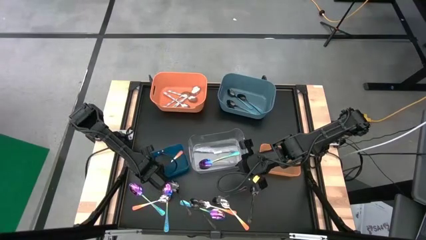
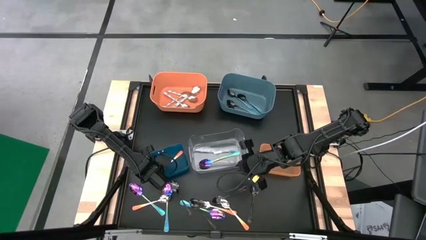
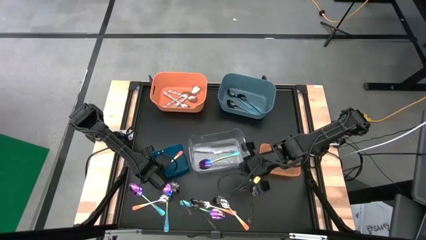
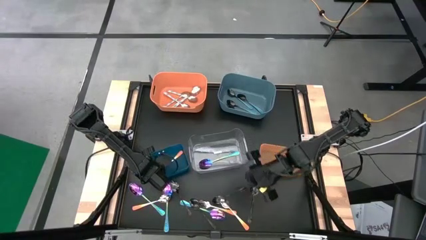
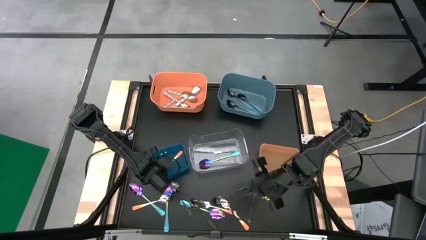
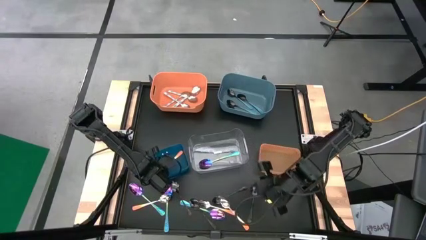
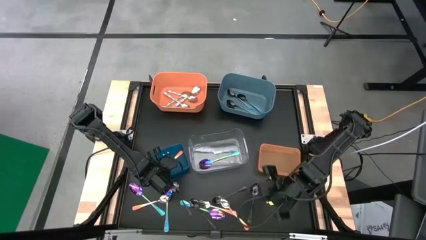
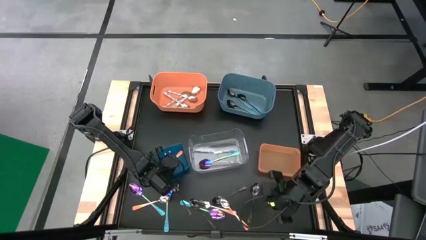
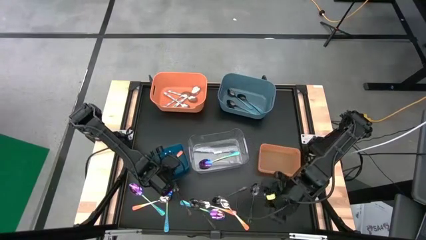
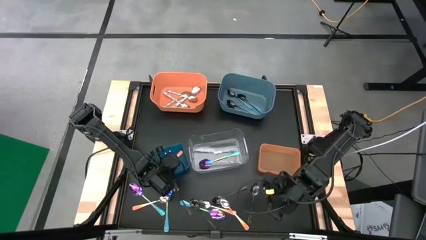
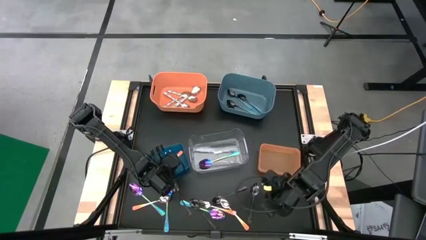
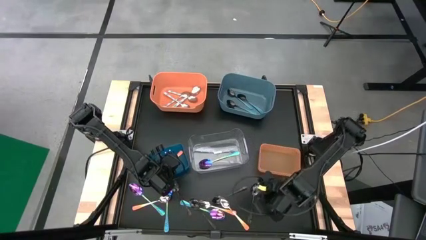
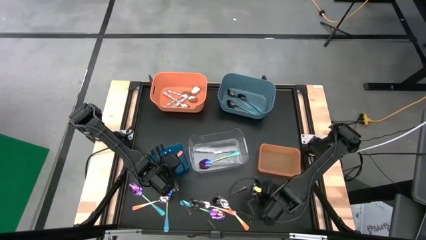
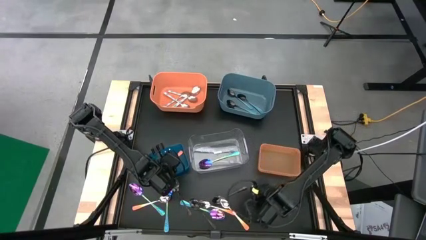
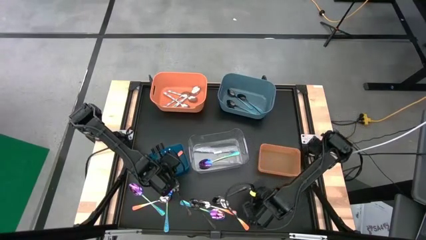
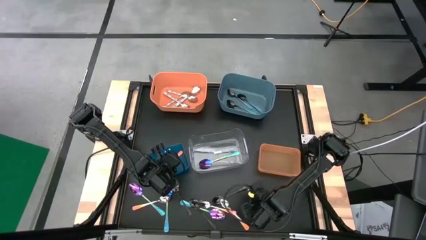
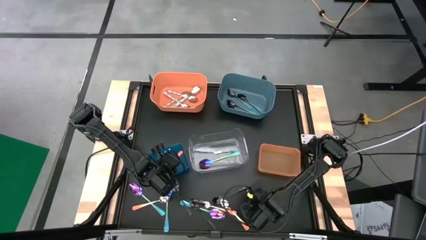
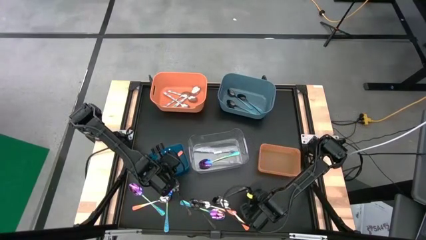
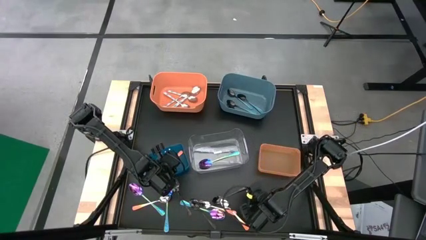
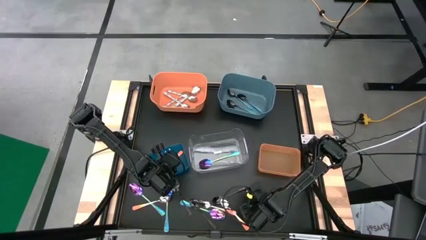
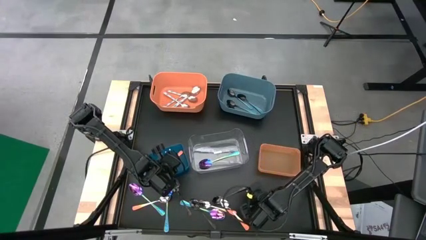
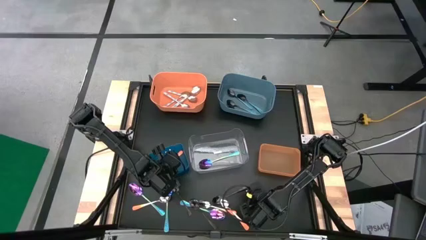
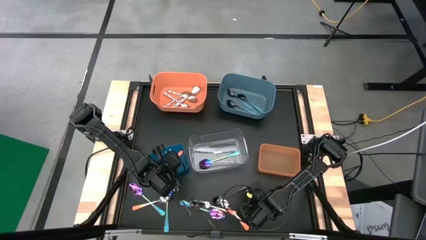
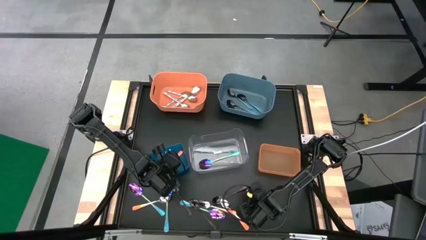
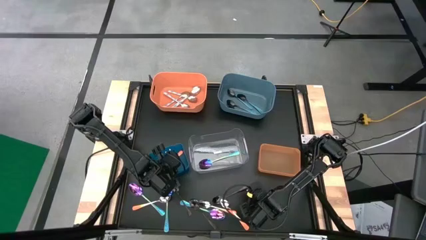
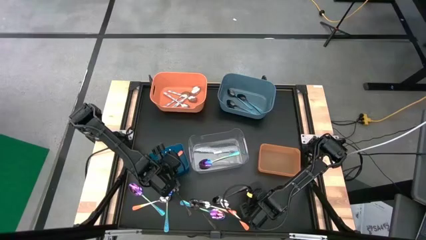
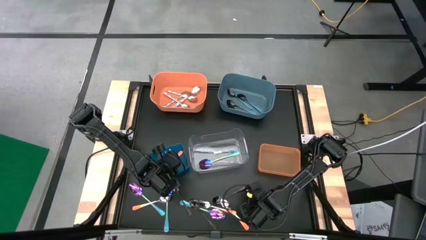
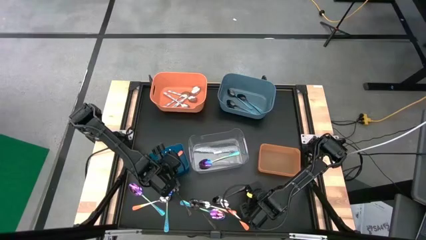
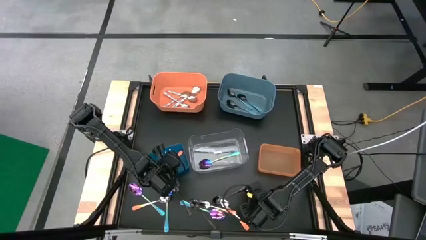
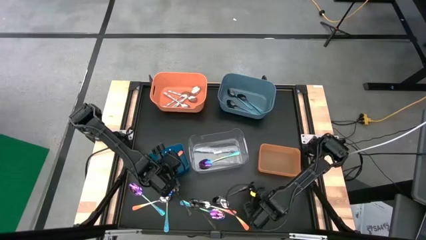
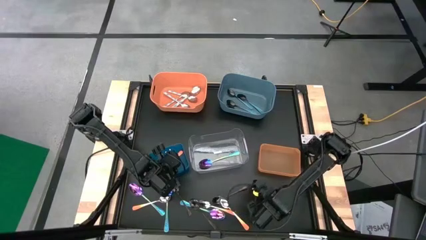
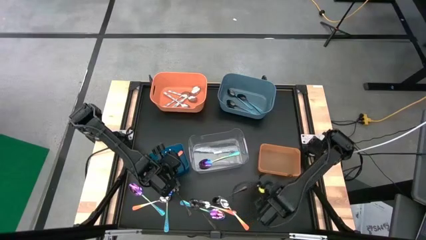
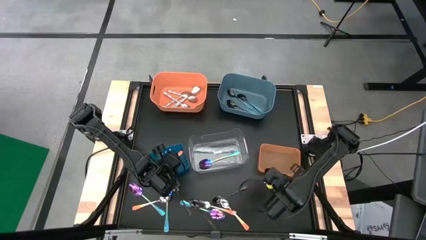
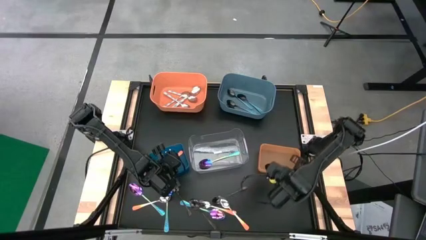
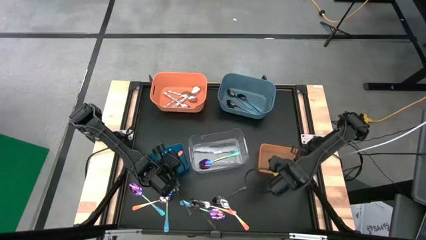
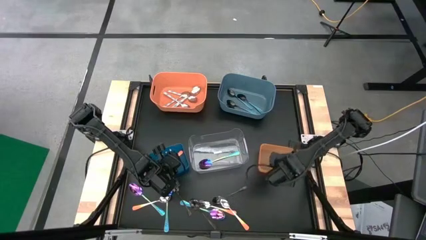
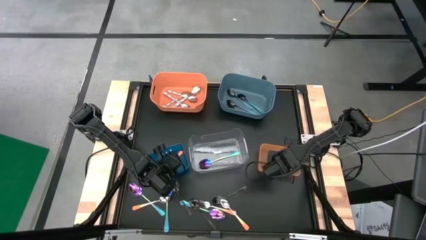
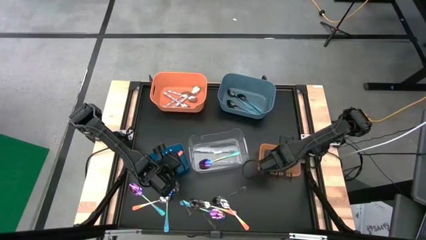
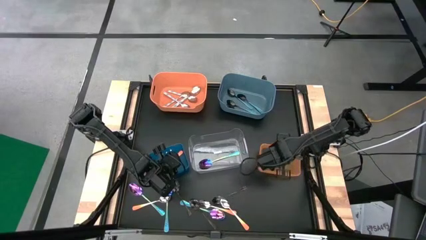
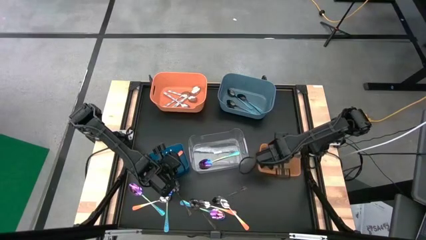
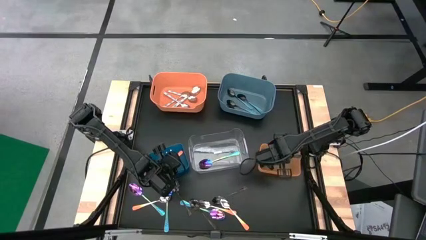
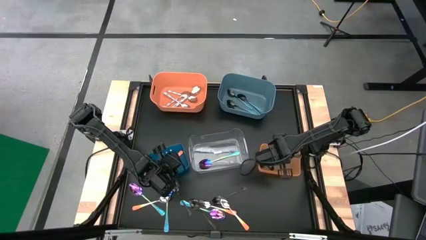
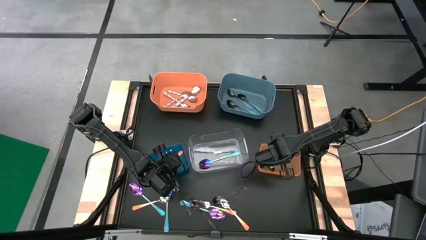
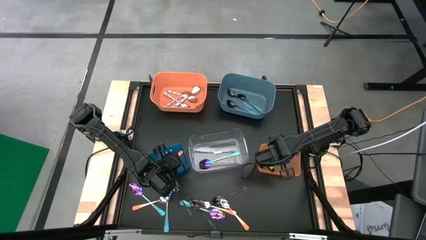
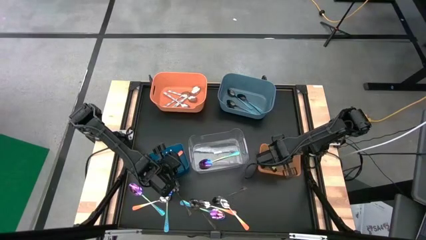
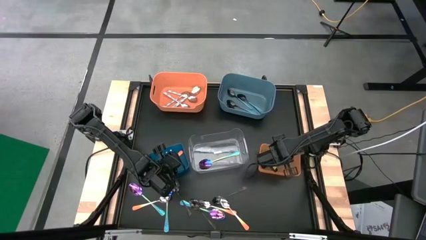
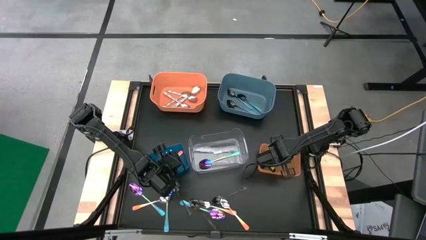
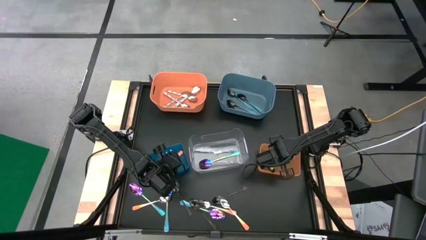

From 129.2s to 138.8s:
Task: Sort silverware by color (type)
Put the black spoon into the light orange bin

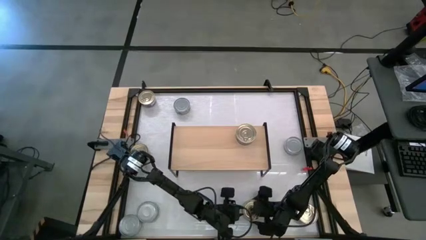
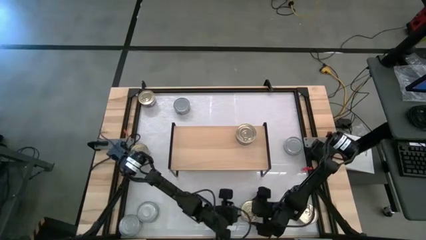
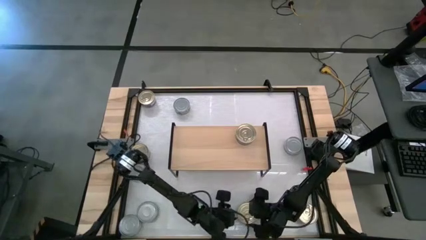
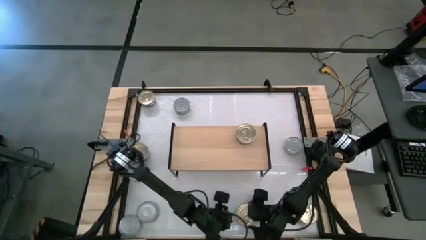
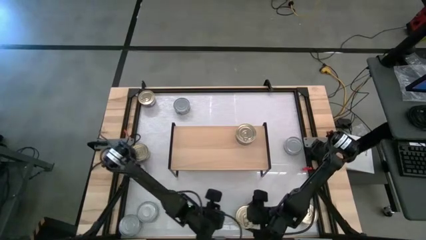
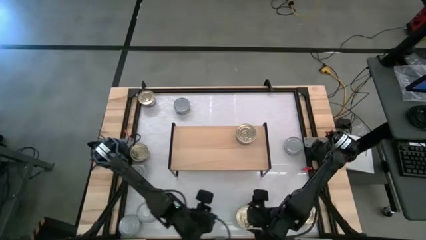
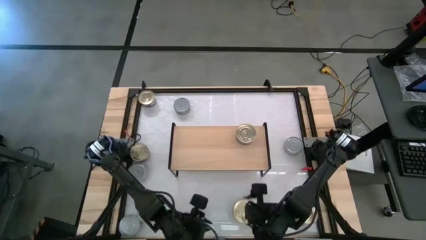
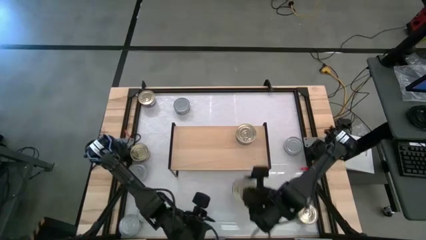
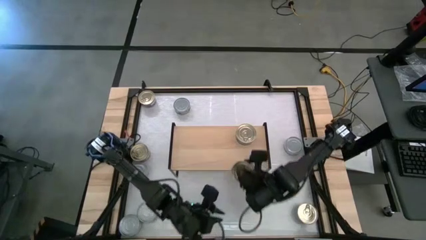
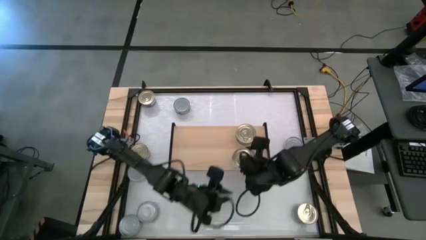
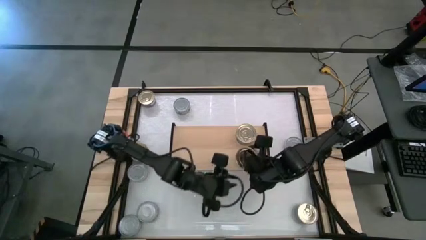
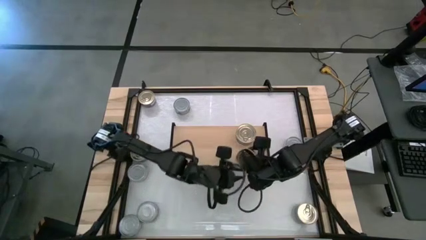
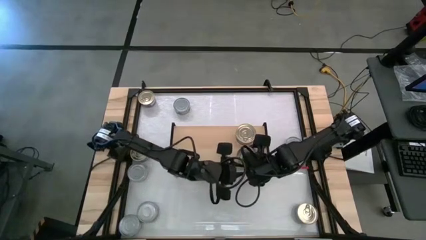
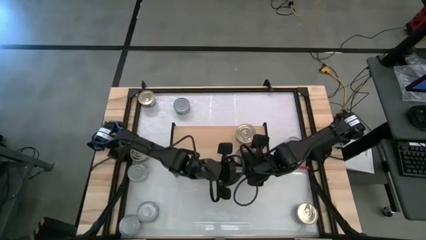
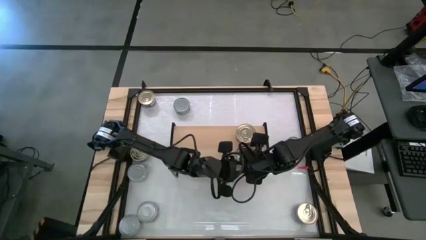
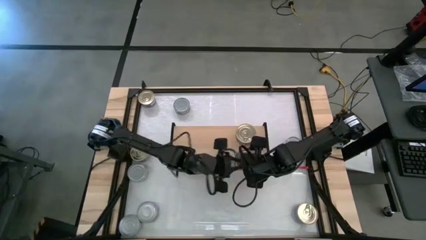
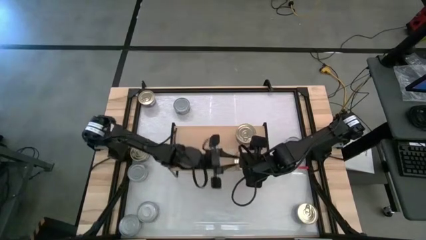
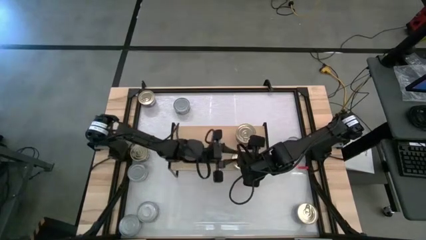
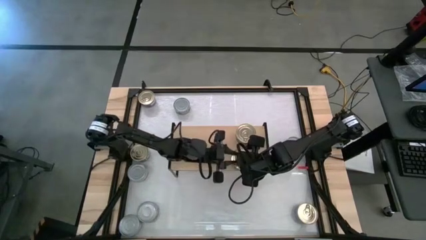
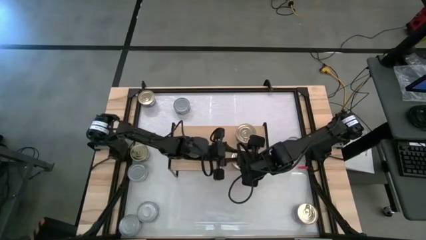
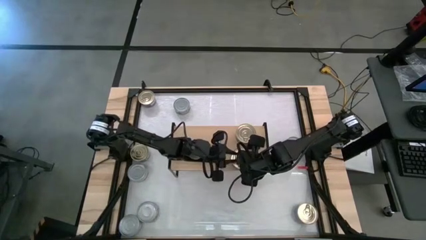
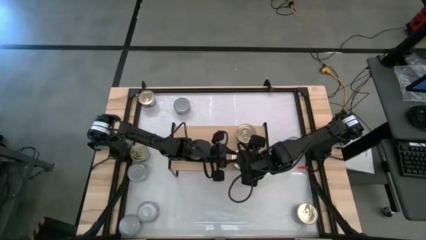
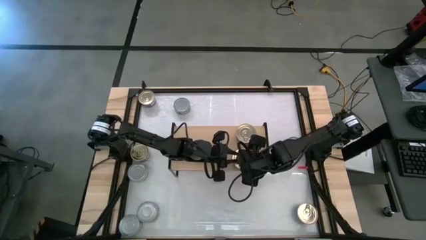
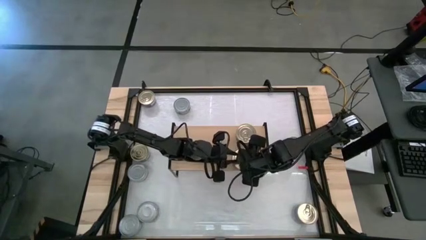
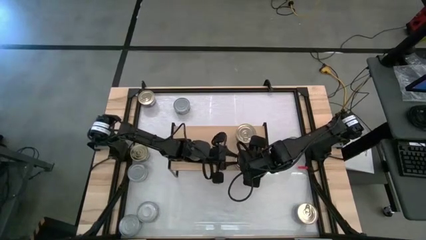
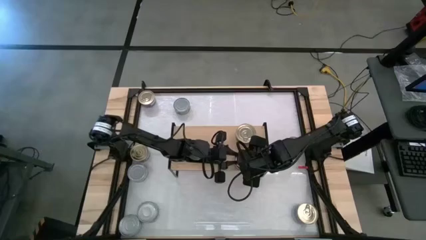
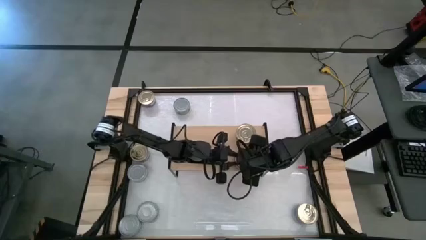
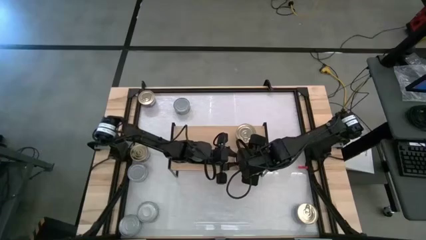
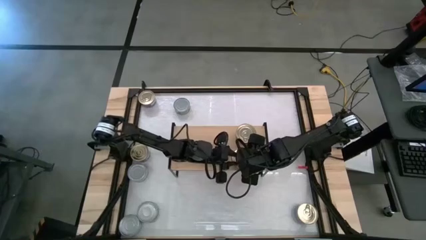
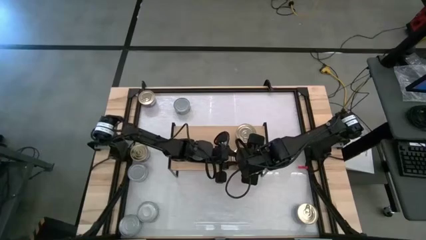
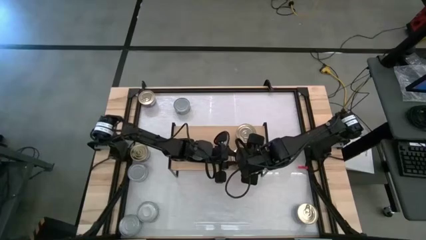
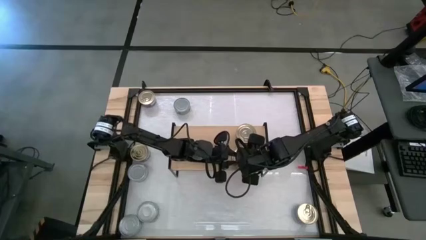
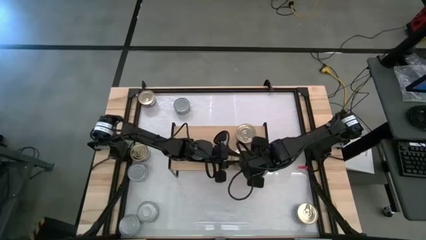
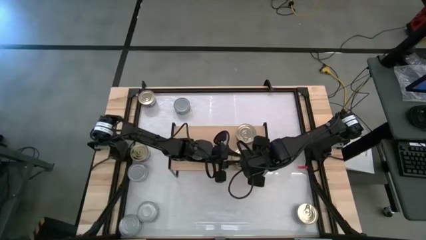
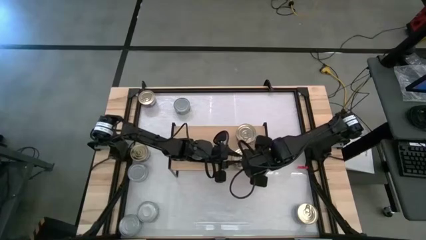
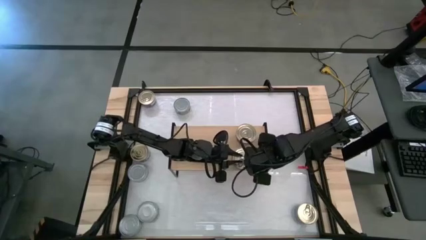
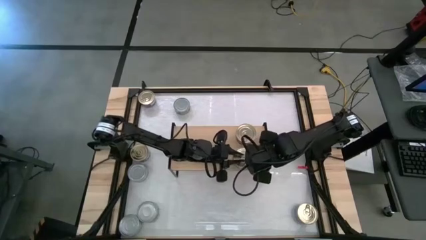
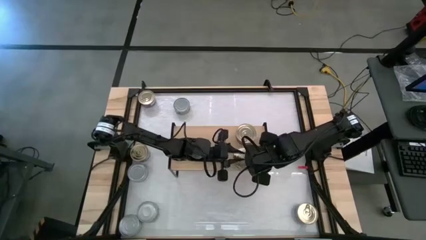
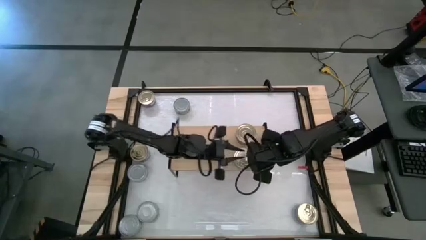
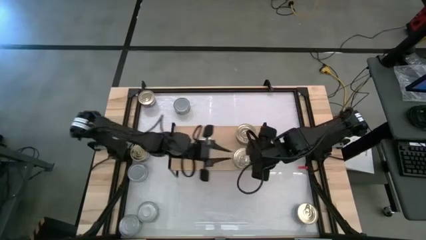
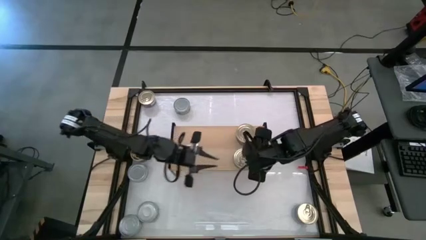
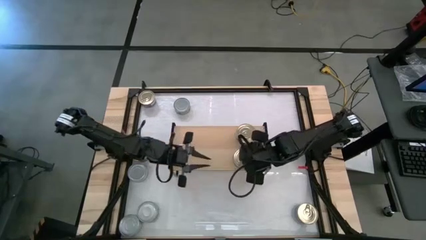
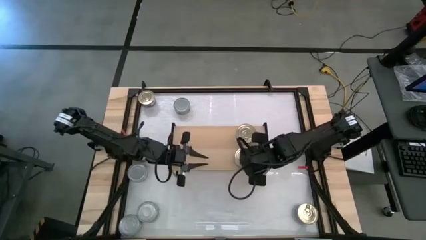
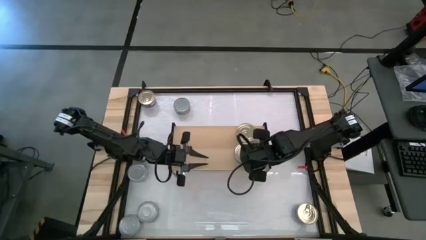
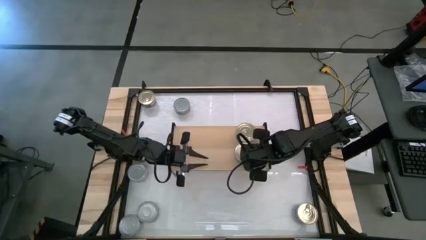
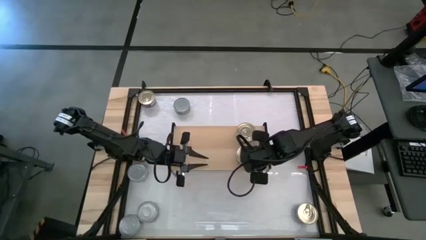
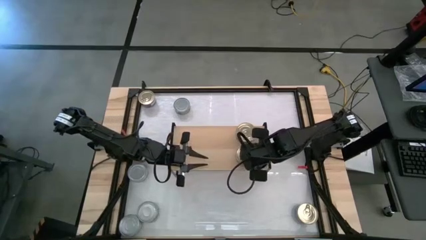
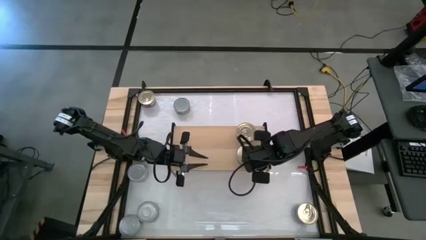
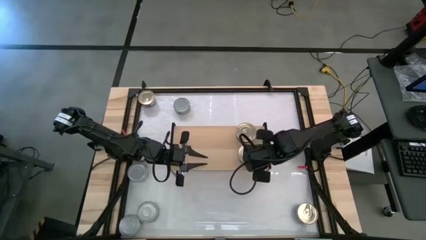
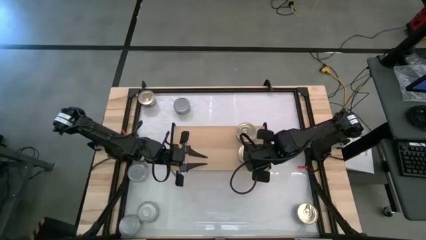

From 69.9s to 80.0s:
Task: Stack canned seafood by type on shelf
Put the blue-pink tuna can on the shelf
